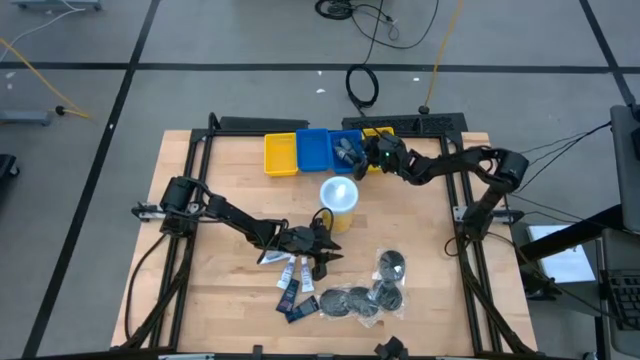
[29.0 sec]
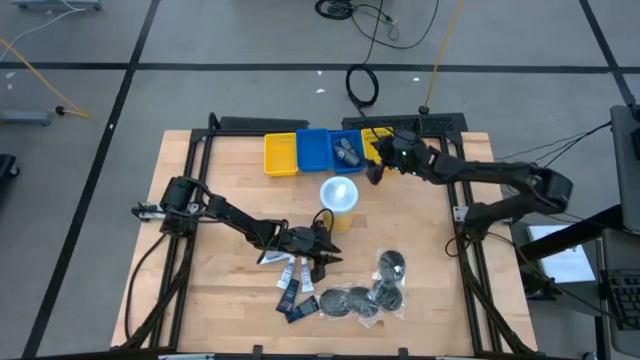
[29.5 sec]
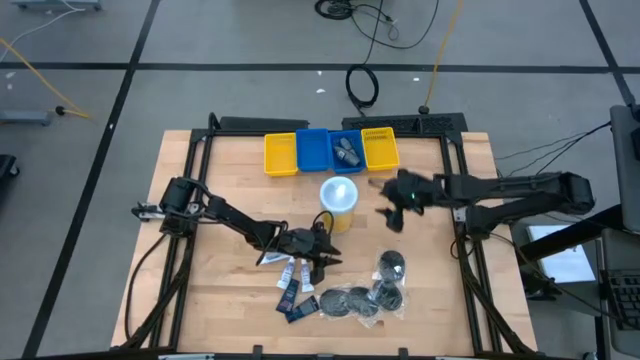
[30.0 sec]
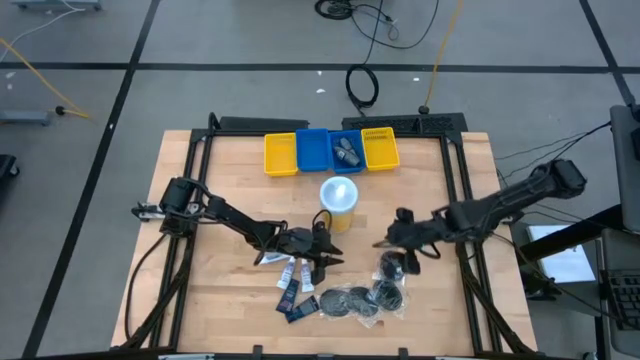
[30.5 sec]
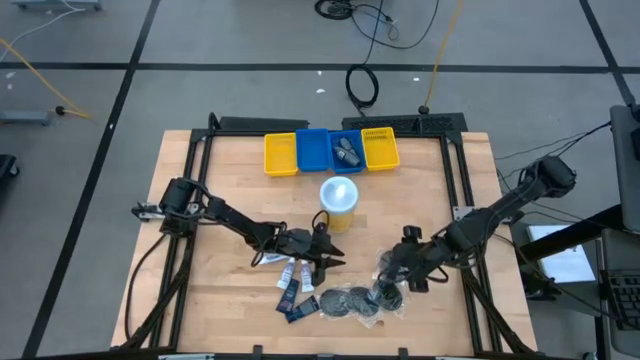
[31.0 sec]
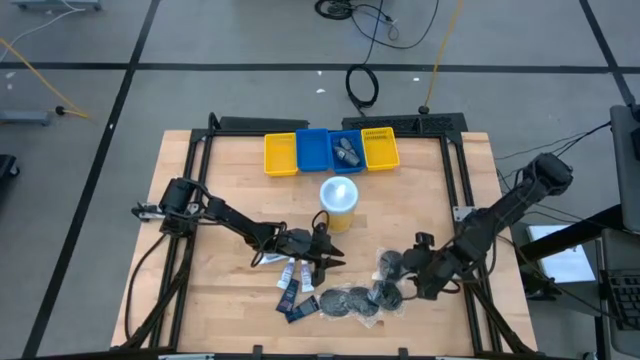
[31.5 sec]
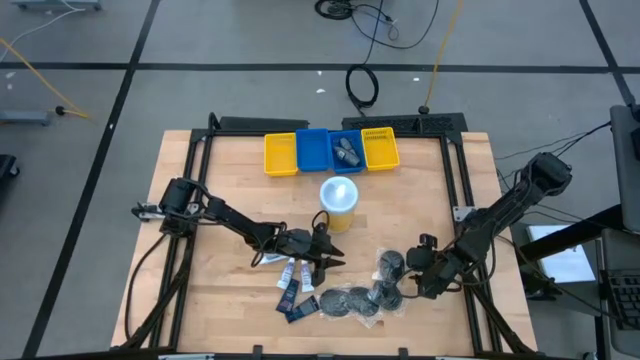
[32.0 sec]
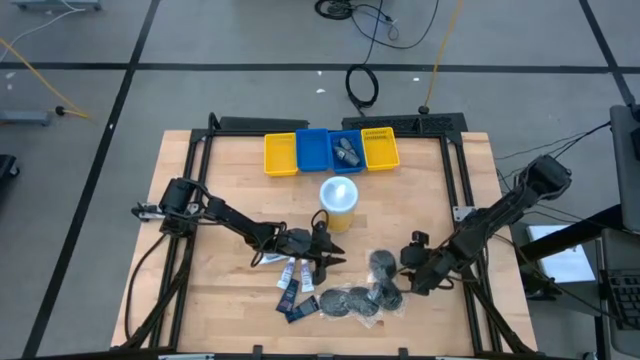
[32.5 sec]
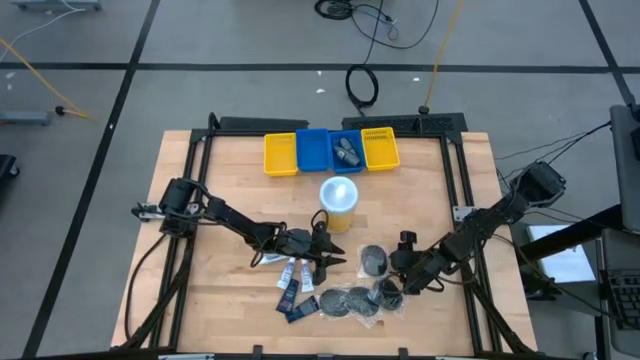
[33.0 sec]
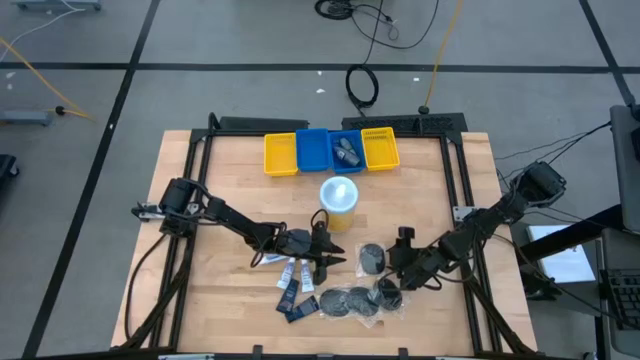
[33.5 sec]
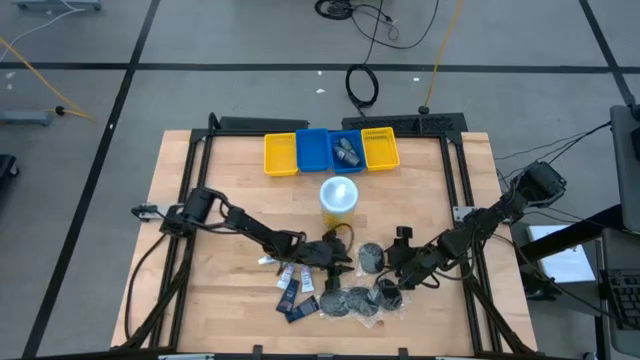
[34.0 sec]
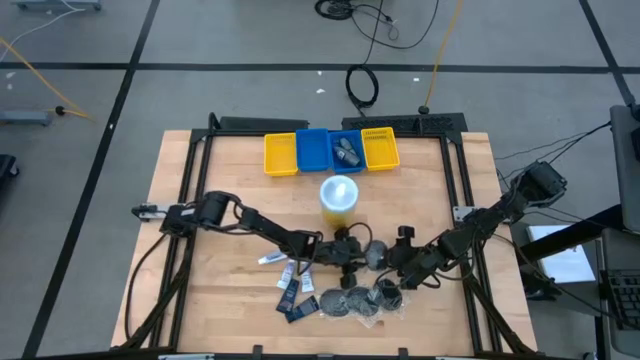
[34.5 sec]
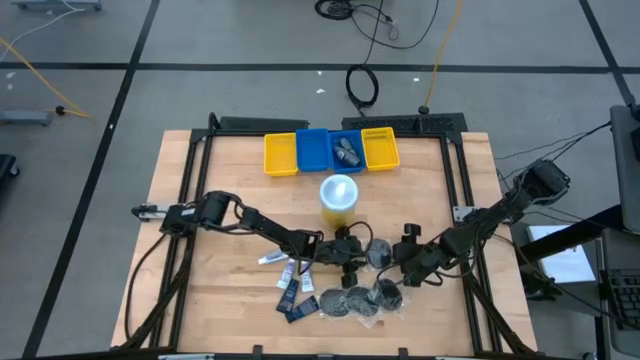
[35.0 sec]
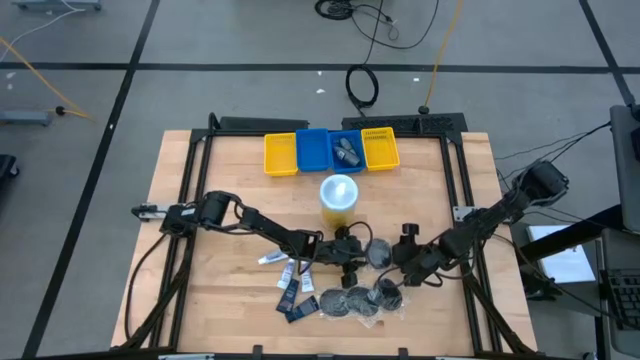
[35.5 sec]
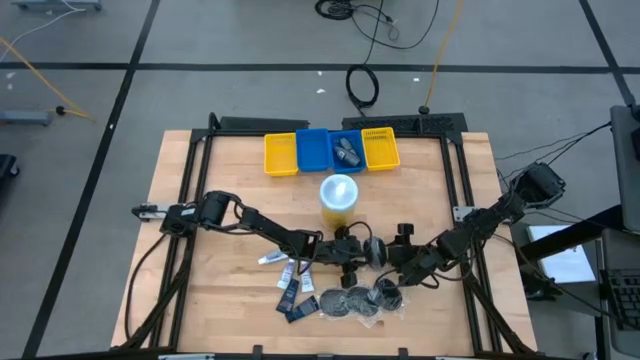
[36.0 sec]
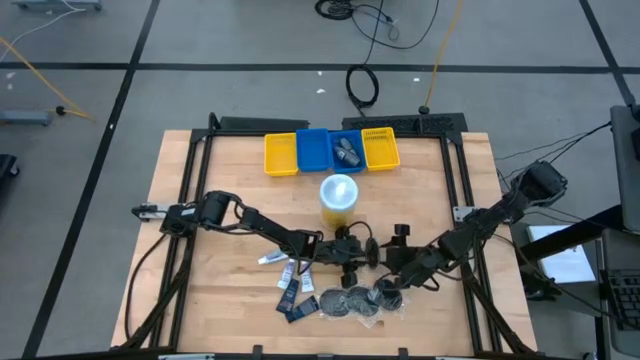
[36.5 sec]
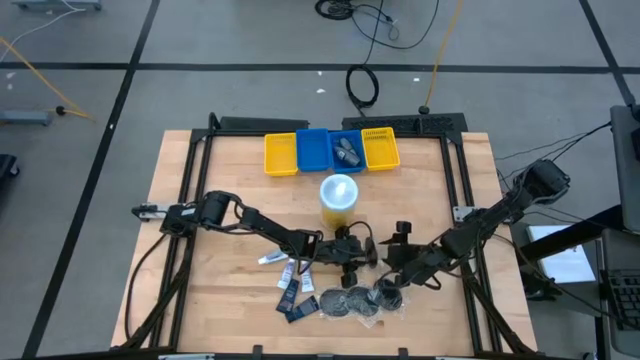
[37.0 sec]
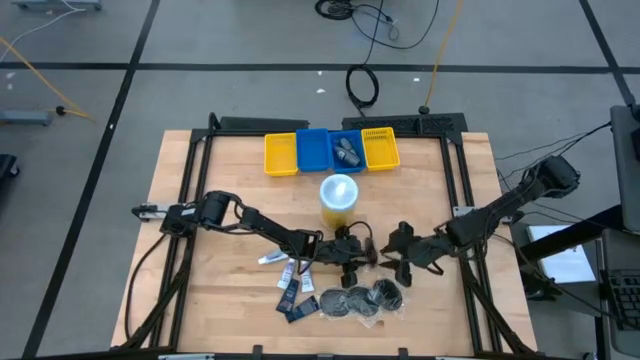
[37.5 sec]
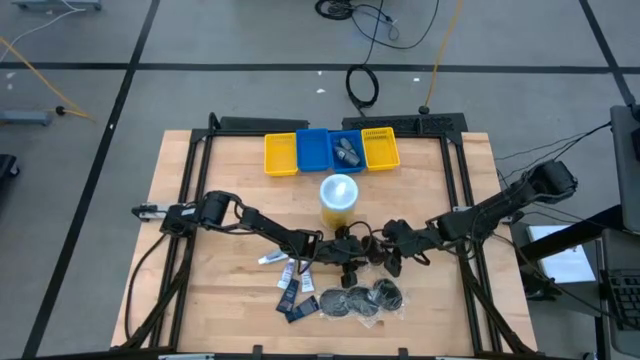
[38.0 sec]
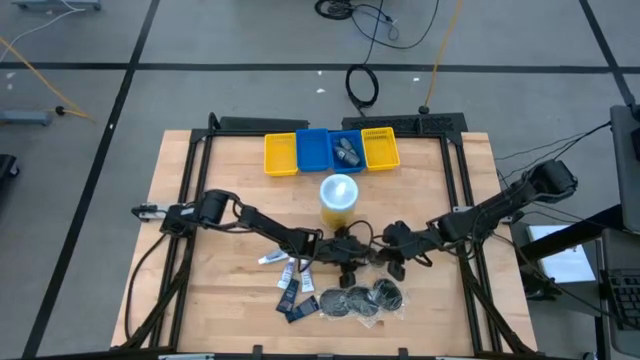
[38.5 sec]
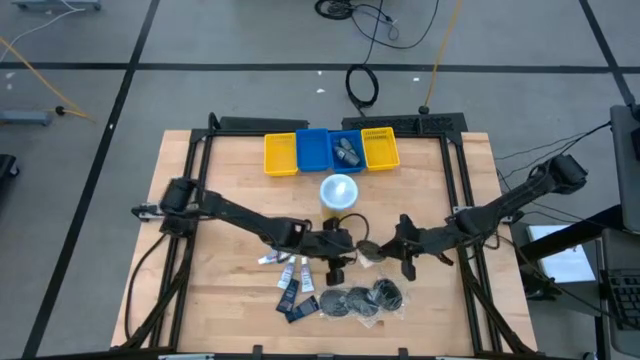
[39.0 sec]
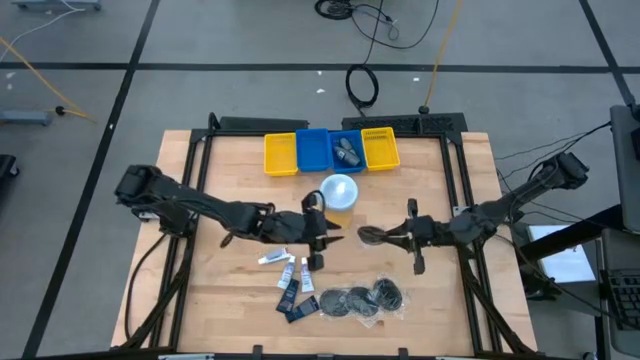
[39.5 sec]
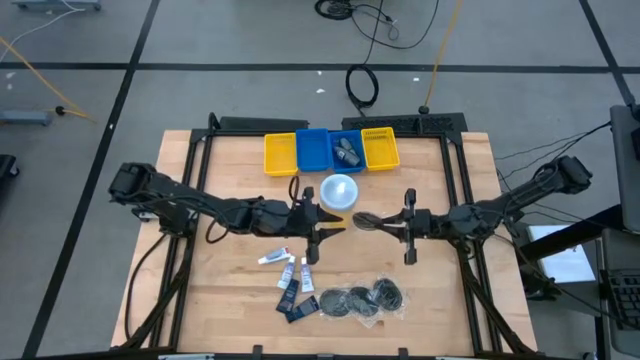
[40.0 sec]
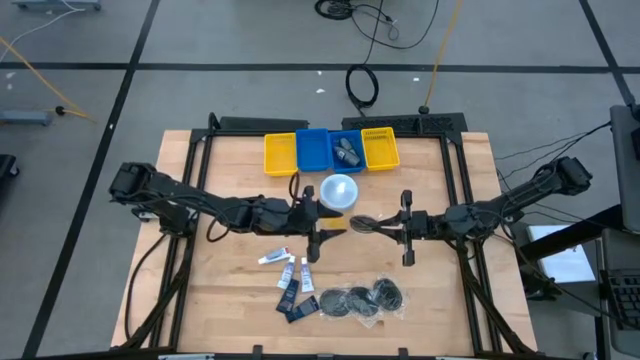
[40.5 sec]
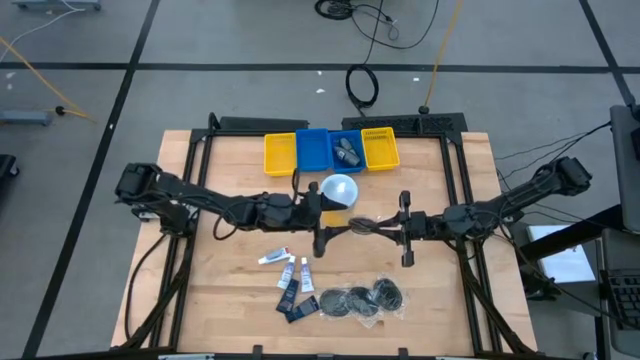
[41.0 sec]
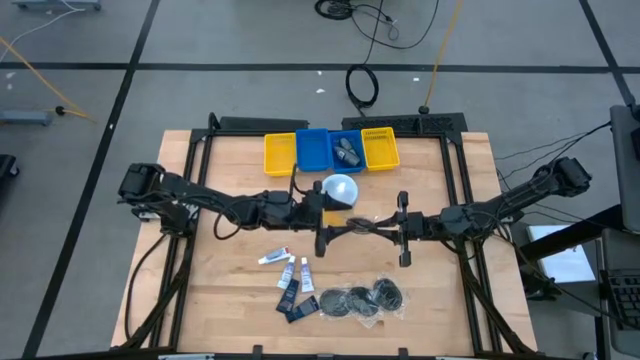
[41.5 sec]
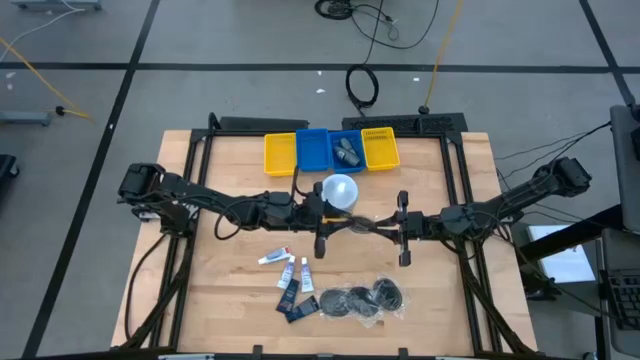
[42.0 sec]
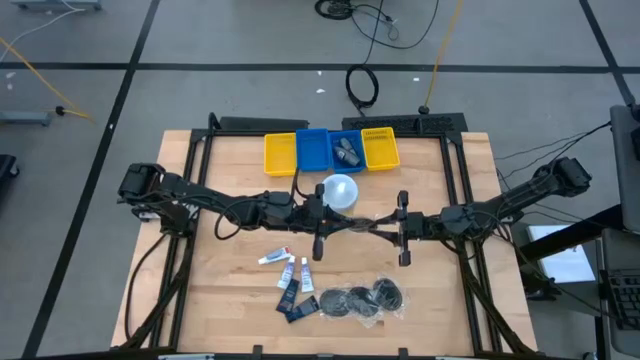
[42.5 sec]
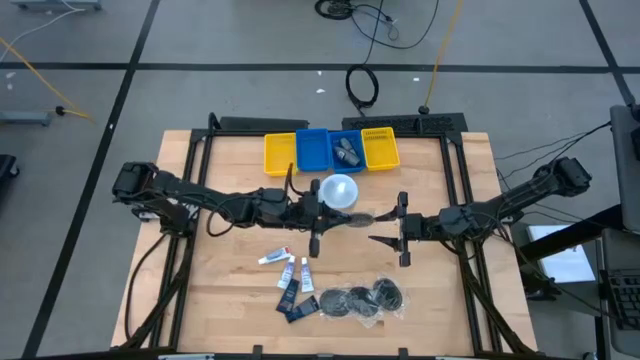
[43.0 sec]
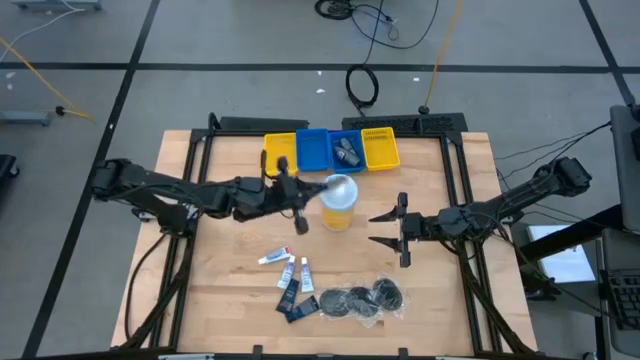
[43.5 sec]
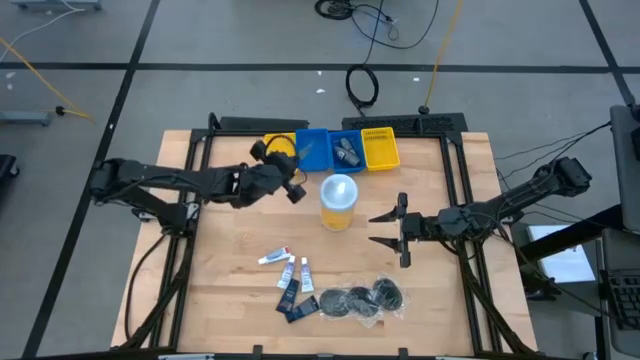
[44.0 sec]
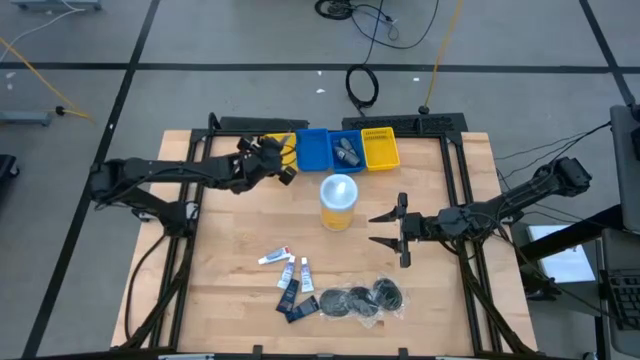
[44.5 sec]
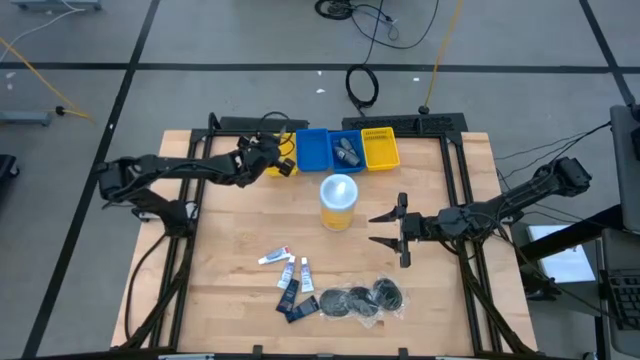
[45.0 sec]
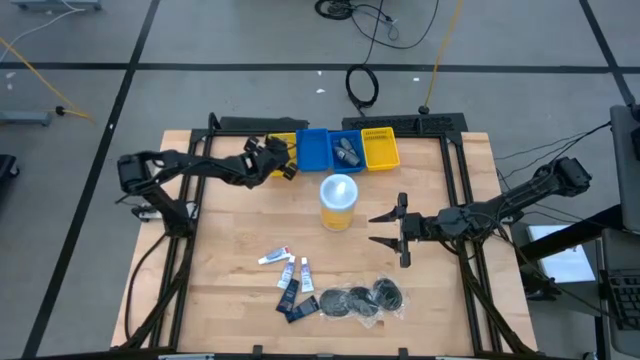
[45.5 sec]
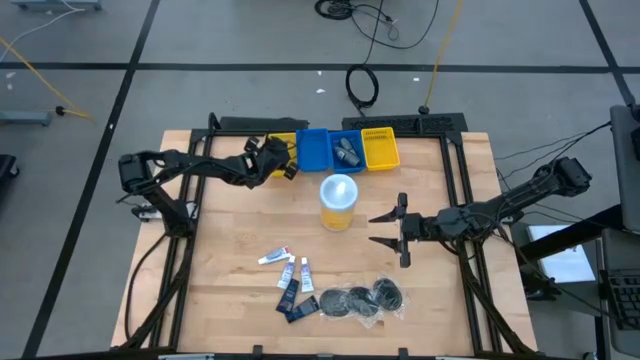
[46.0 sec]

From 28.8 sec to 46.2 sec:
Task: Pick & Place Travel size toiletries
Put the hairbrush into the left yellow basket

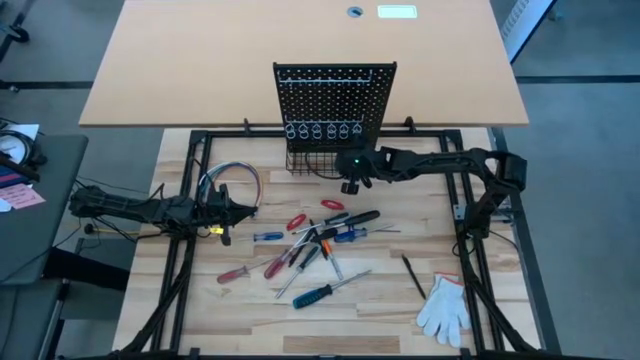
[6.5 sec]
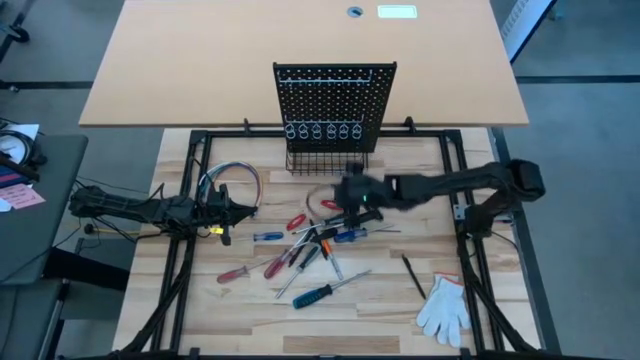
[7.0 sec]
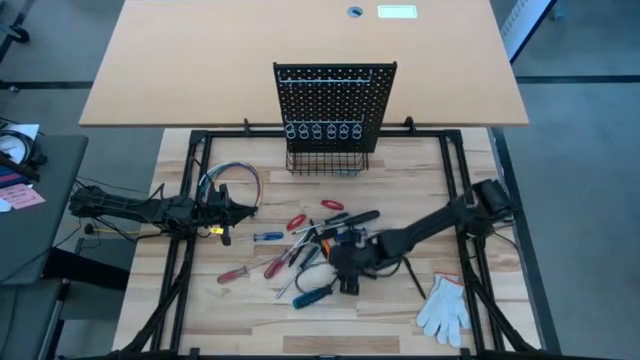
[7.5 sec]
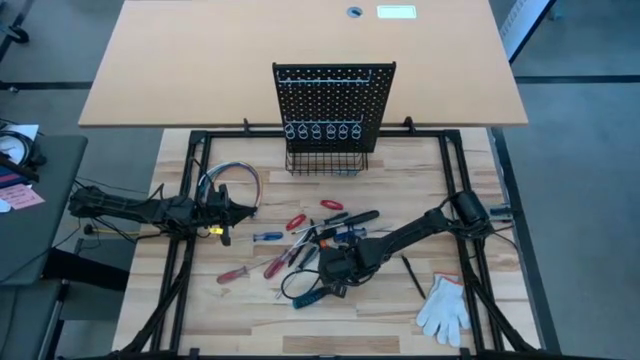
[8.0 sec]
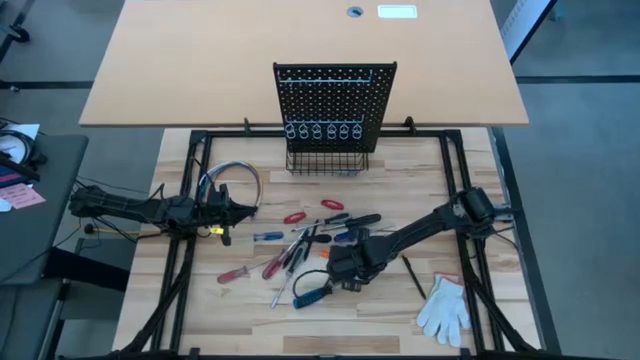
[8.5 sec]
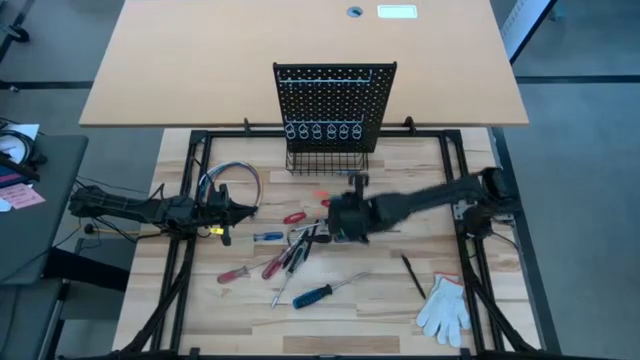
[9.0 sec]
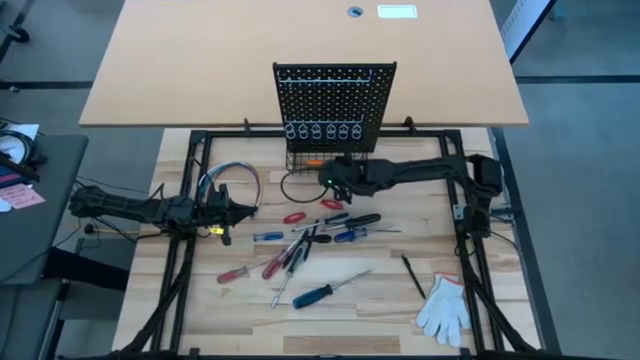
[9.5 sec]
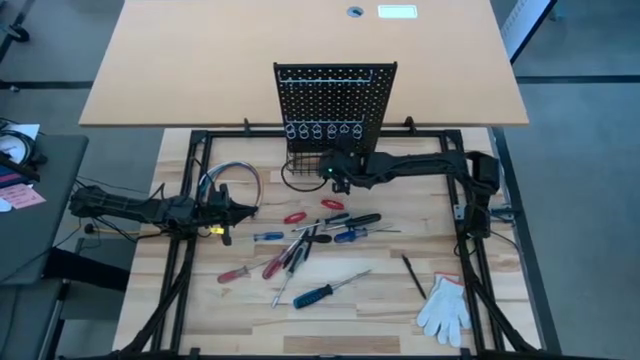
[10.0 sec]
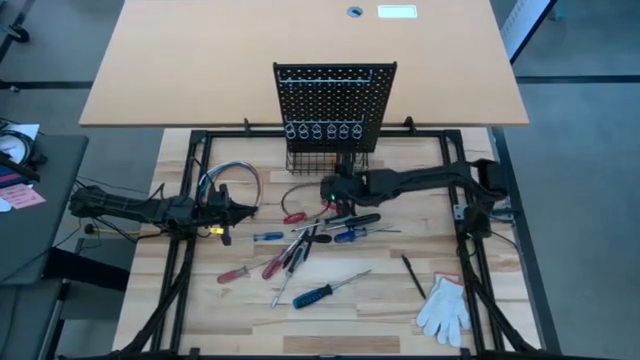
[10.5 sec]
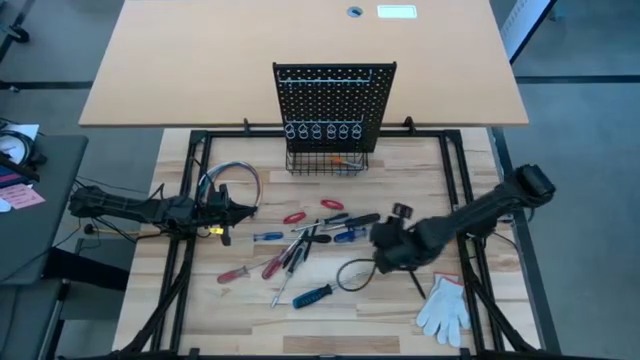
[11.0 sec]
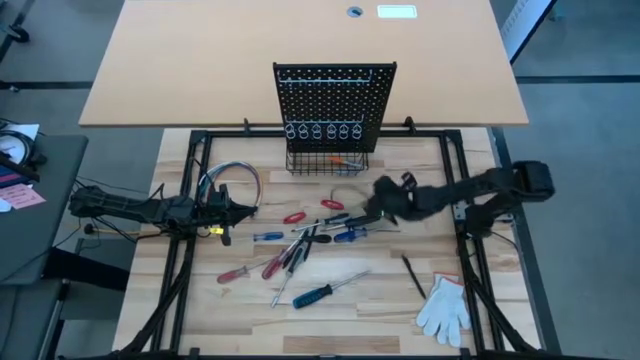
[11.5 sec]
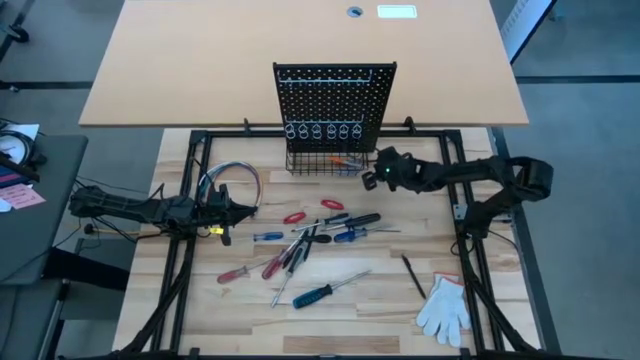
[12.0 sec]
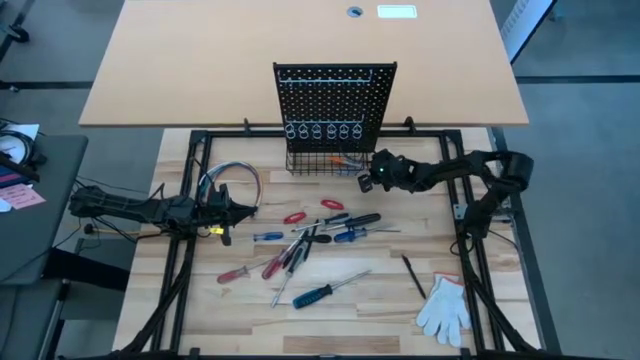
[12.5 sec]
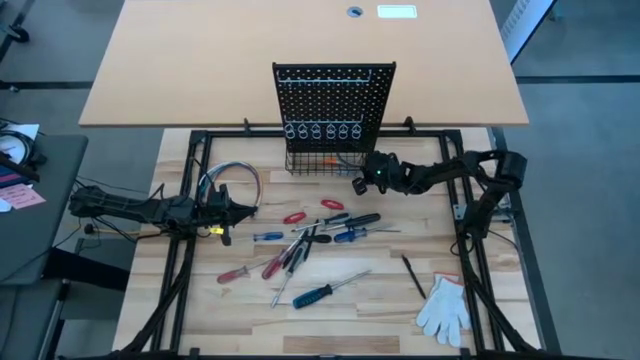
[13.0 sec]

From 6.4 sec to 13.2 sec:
Task: Hang tools onto peg board
Put the orange pen into the wire basket on the pegboard
